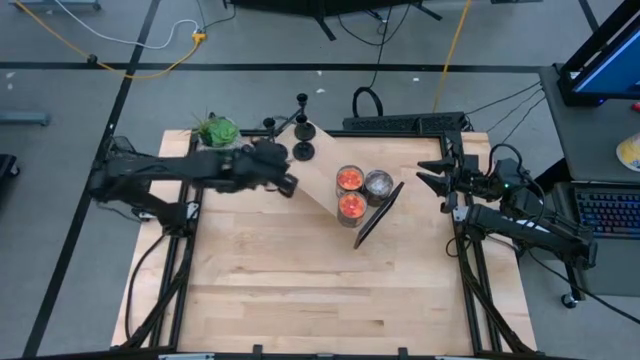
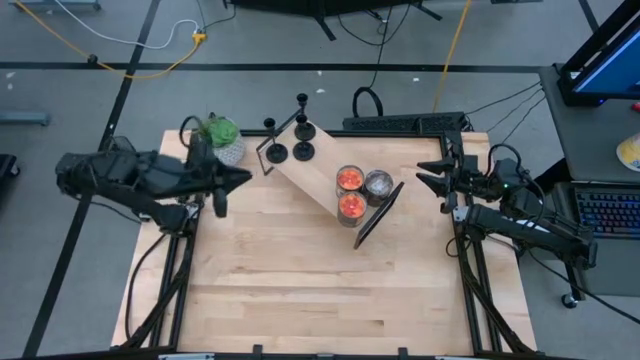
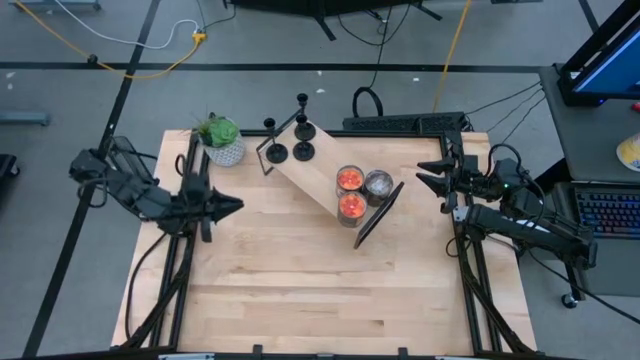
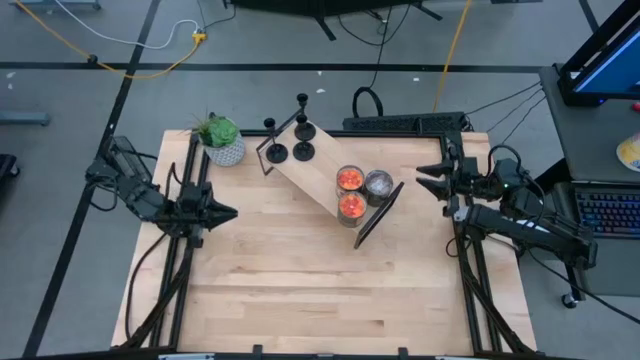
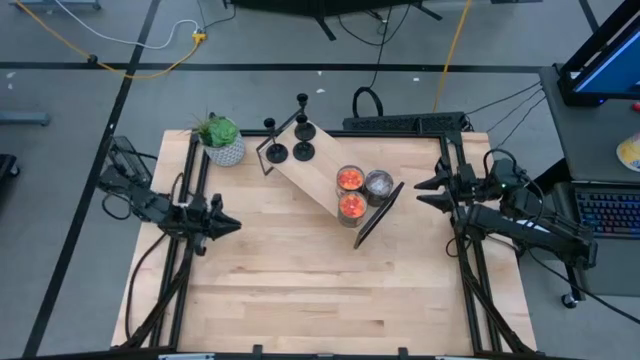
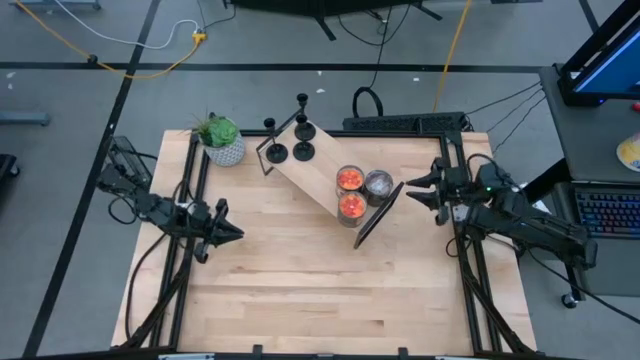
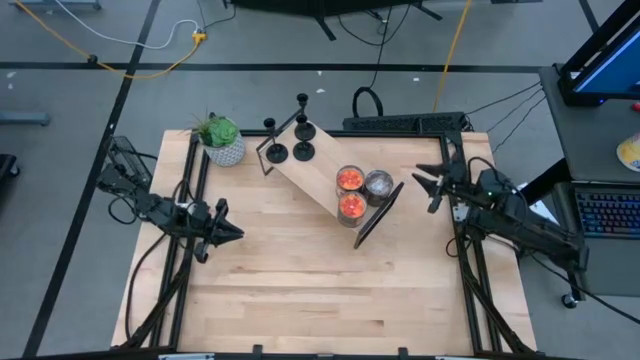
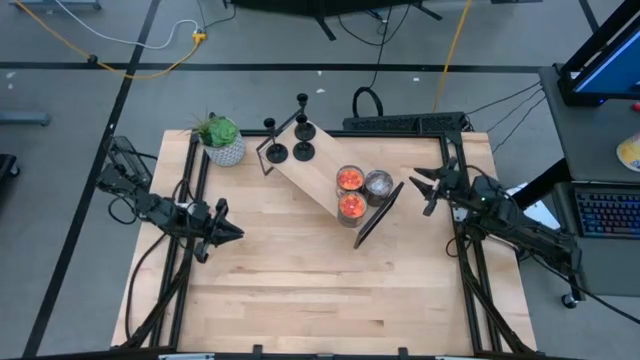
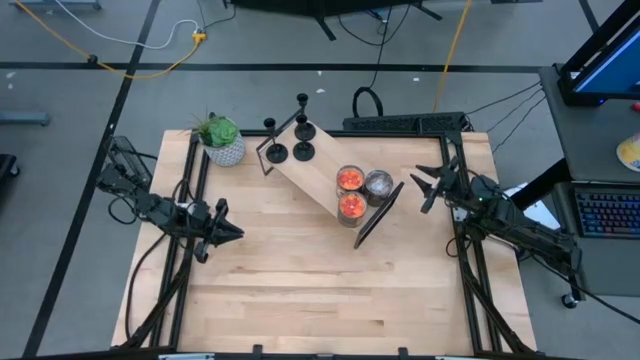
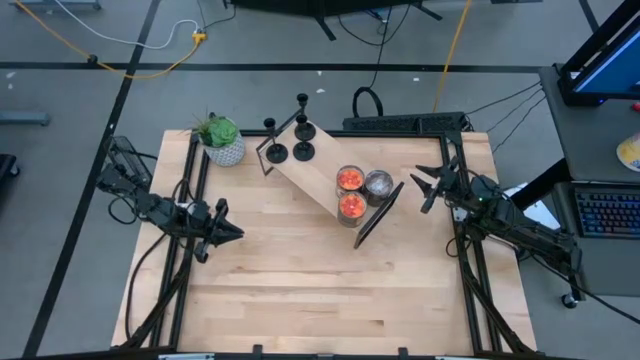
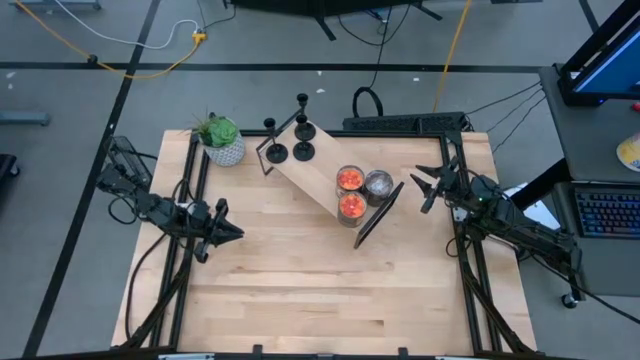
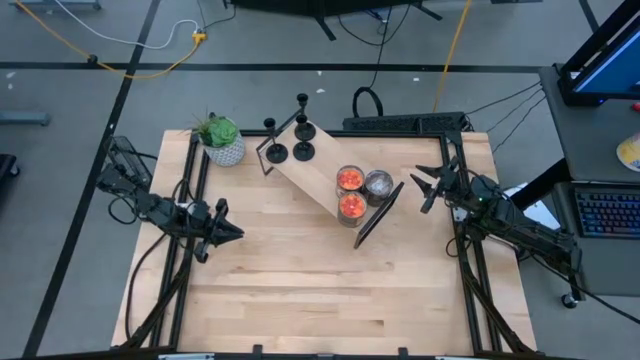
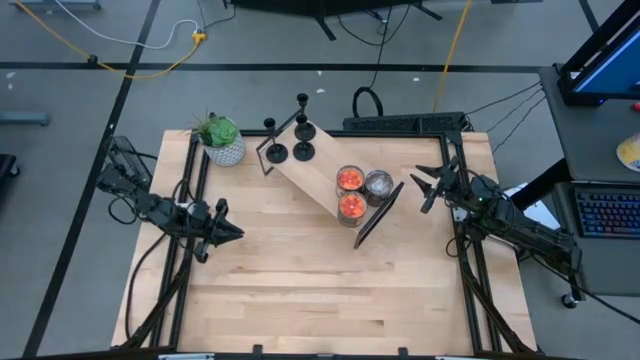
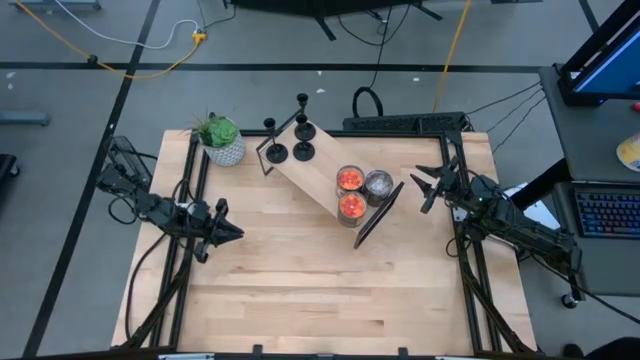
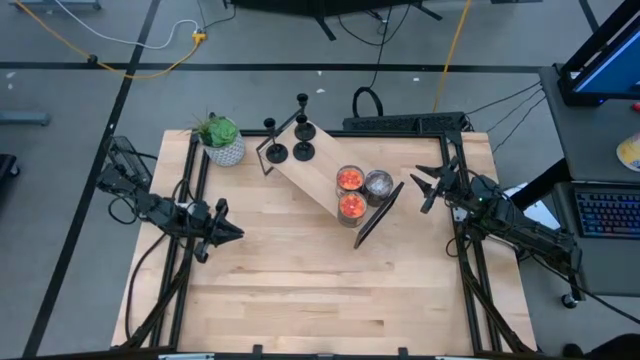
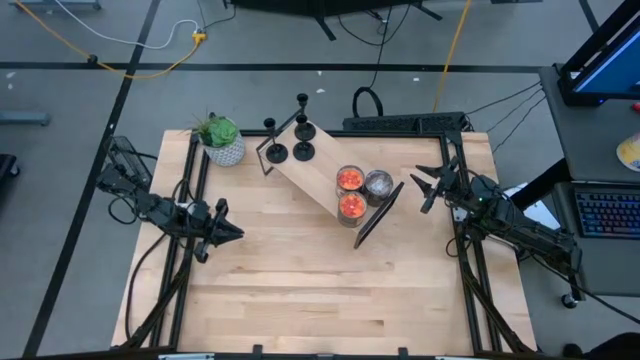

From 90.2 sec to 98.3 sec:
Task: Pick & Place candle stick holders
Return to Home Position

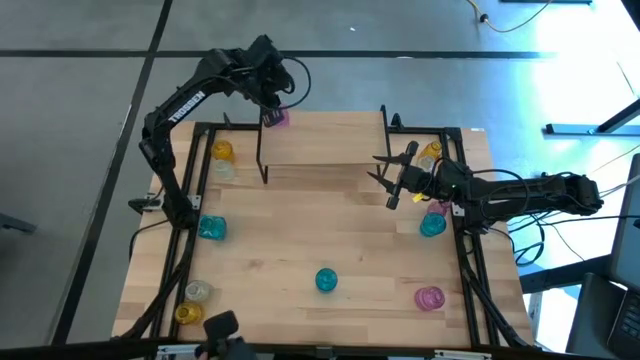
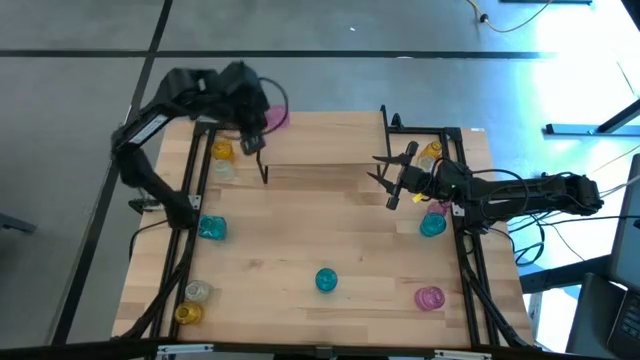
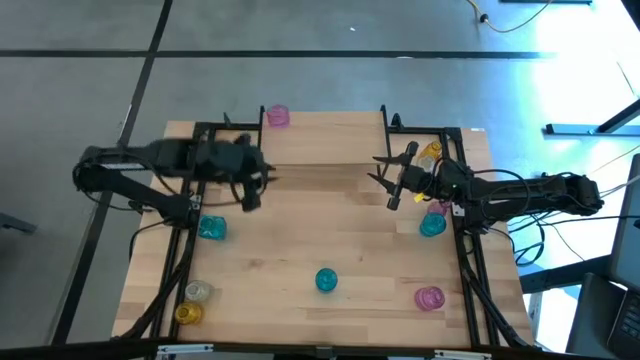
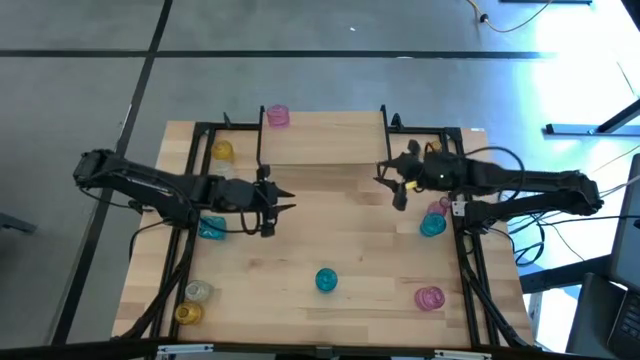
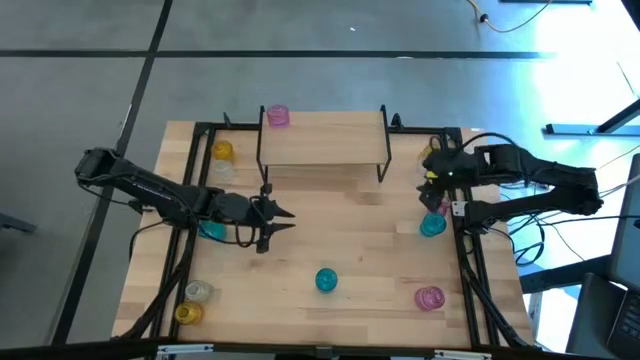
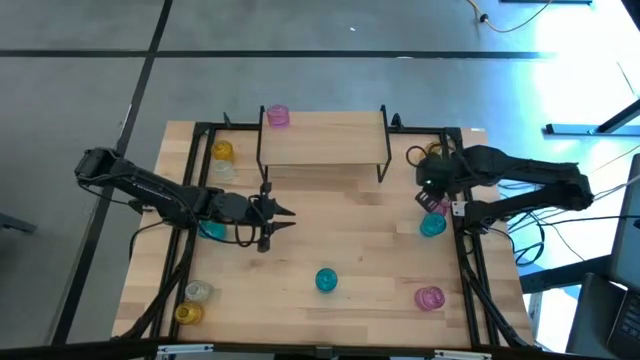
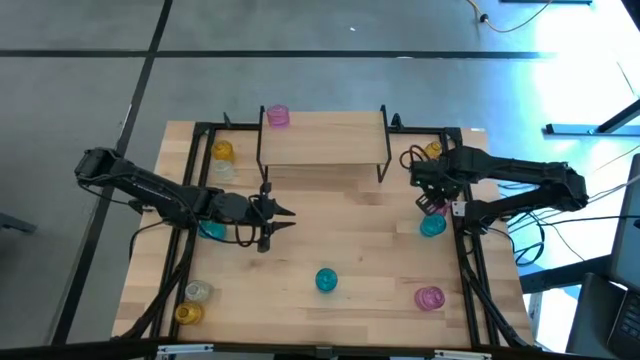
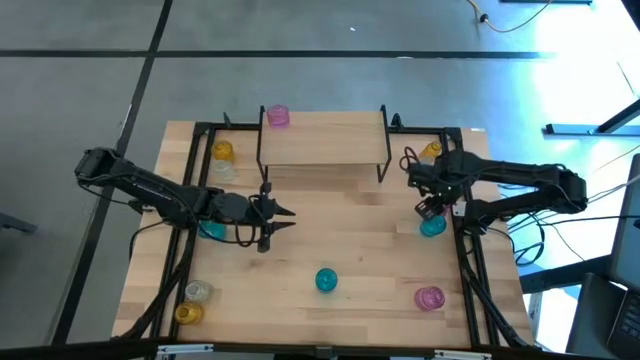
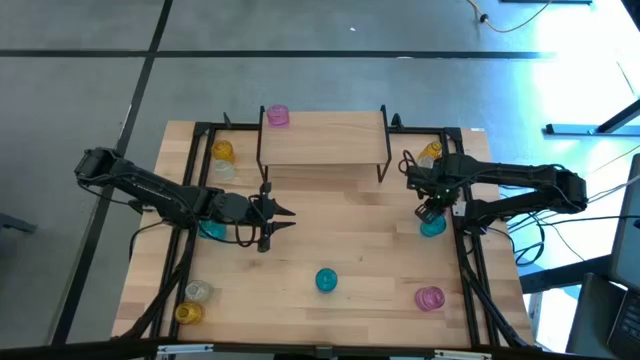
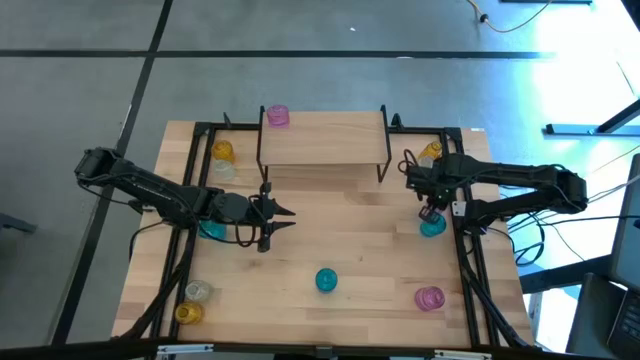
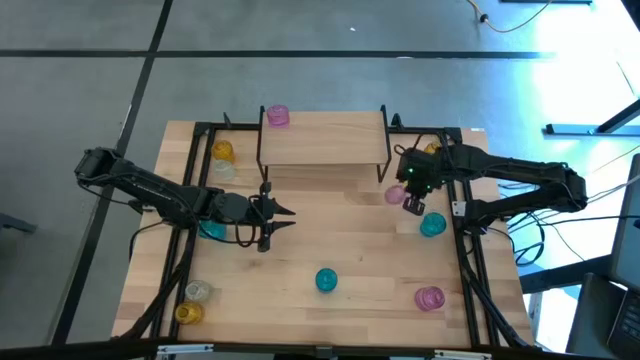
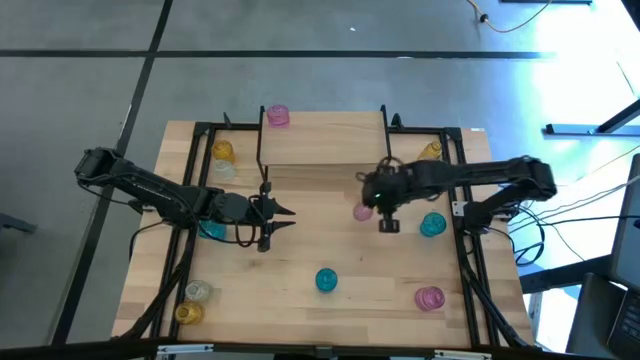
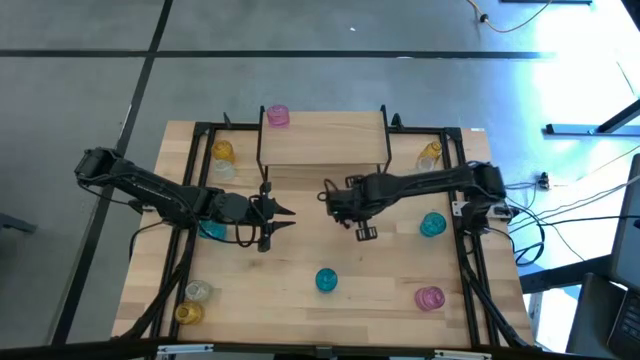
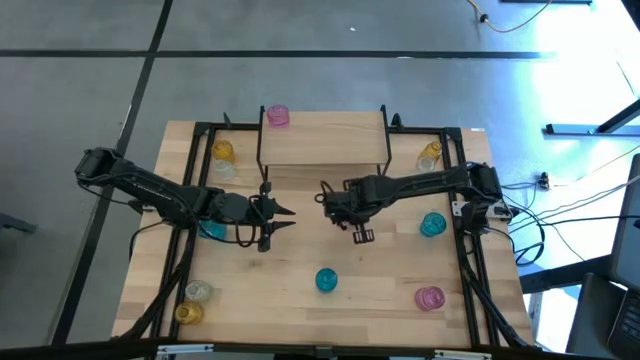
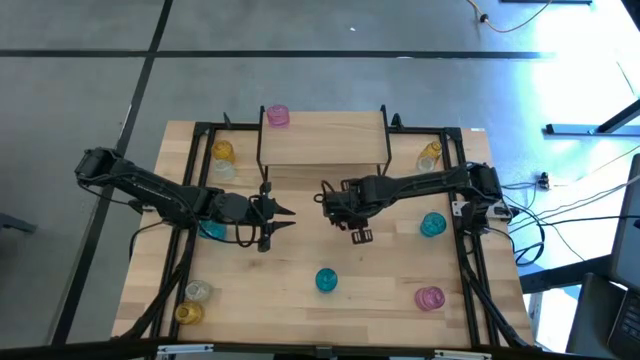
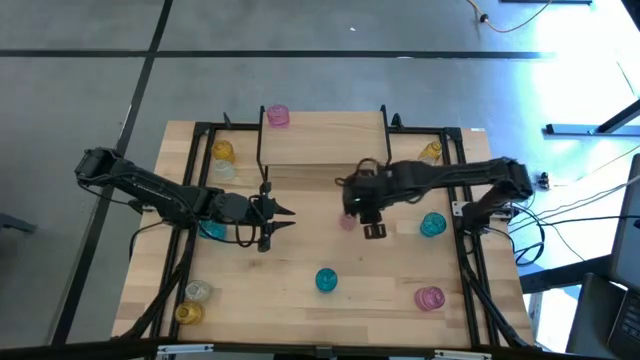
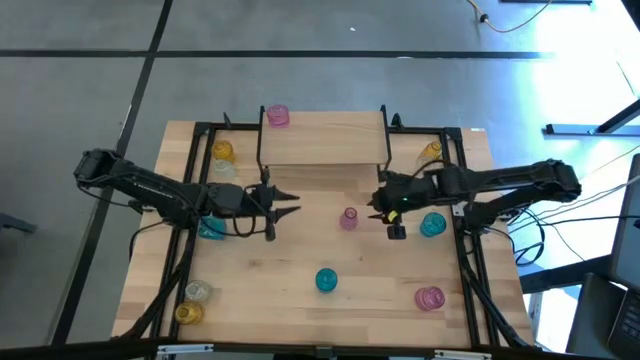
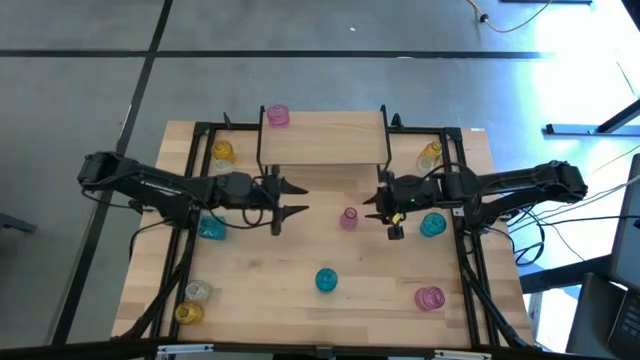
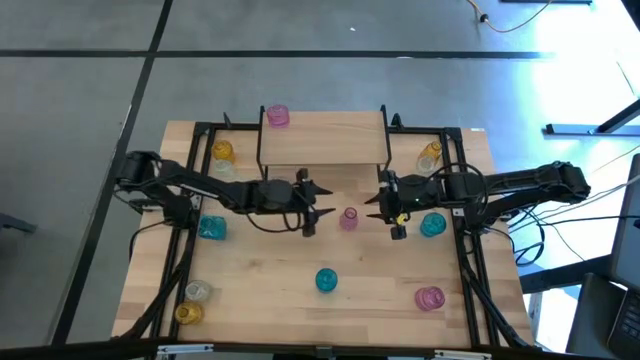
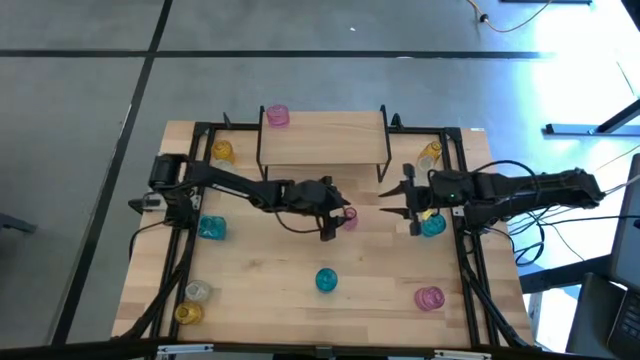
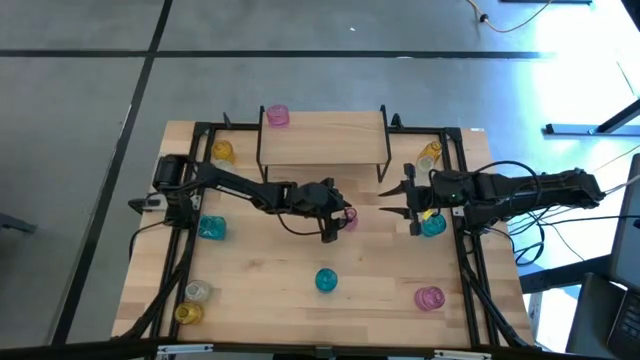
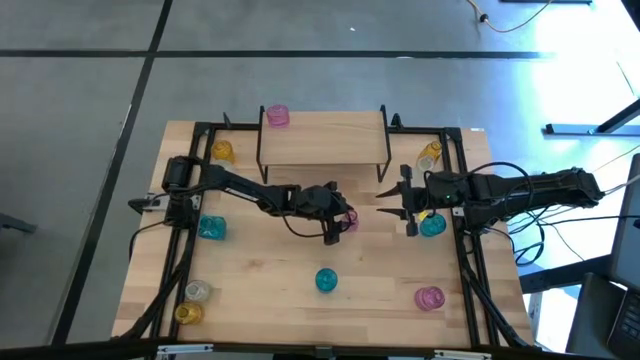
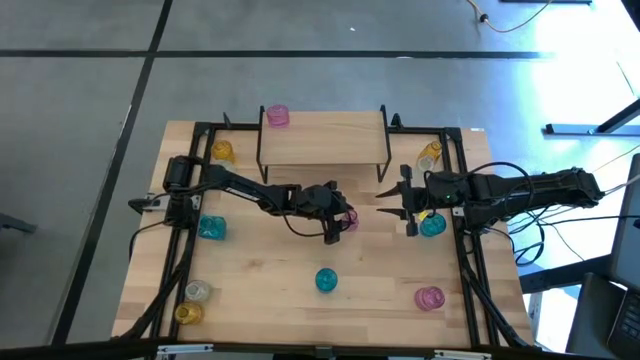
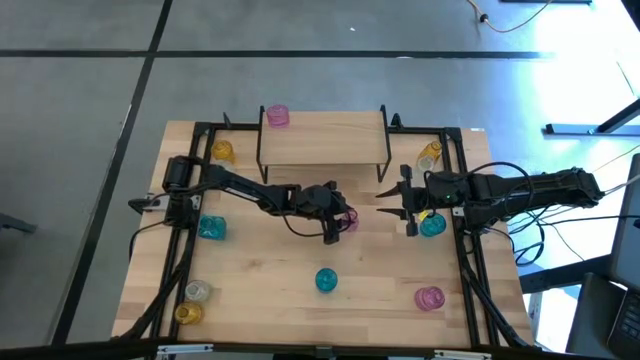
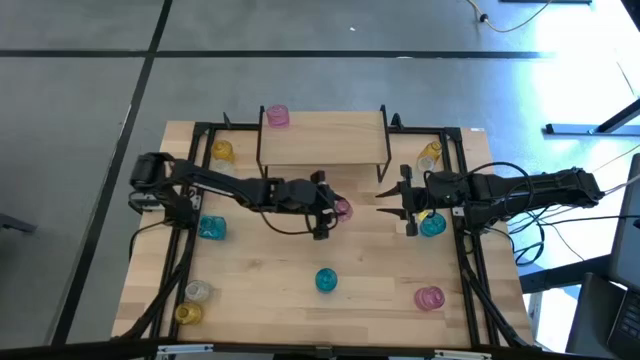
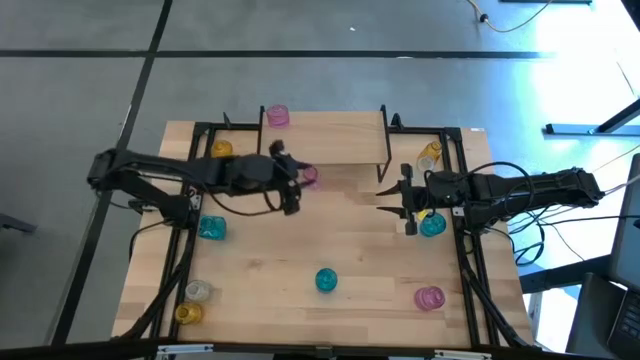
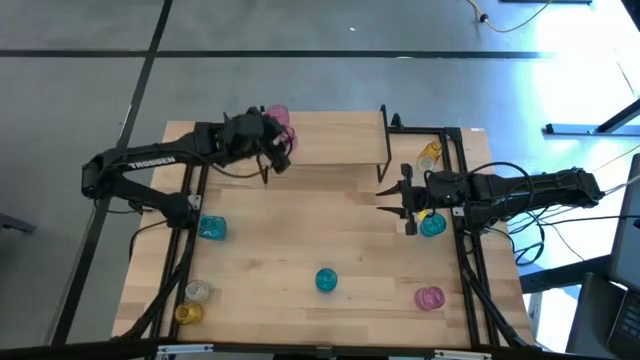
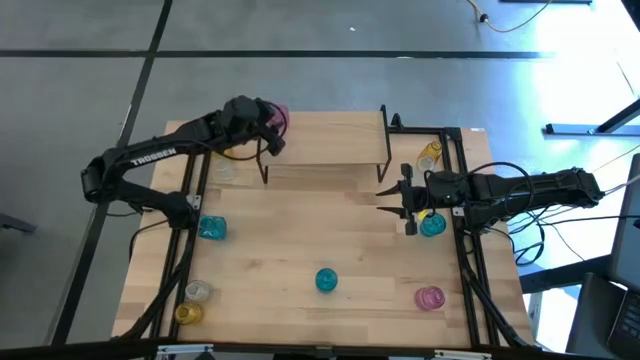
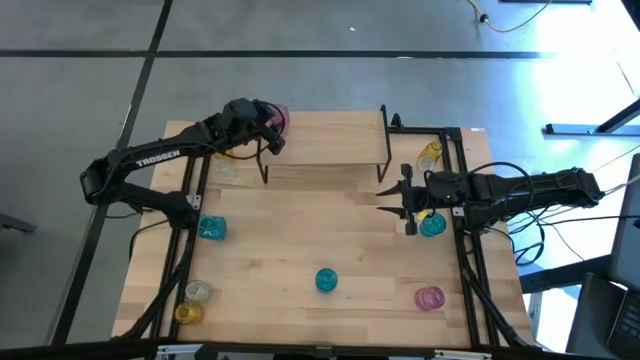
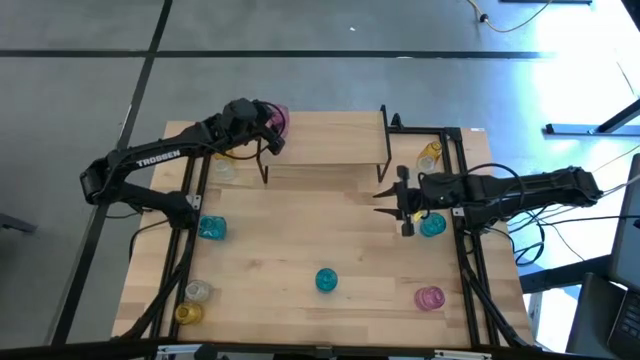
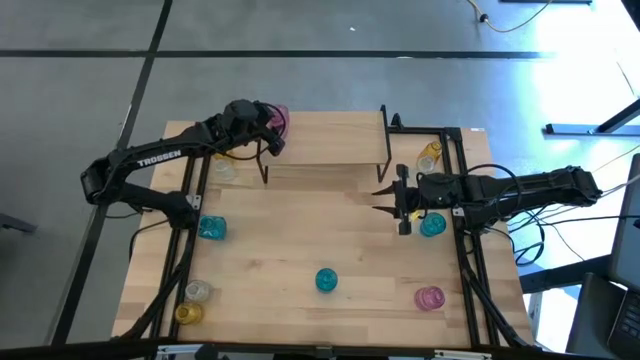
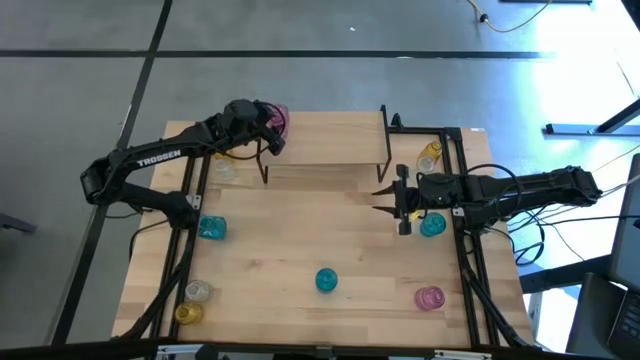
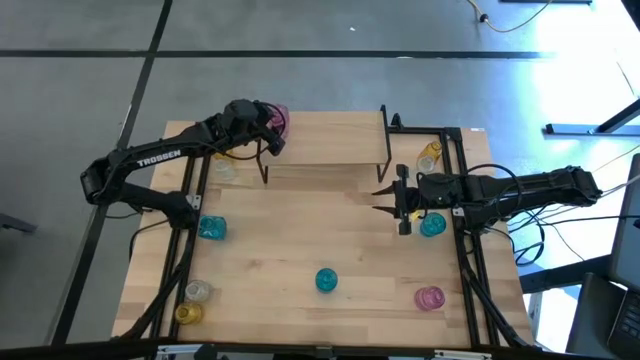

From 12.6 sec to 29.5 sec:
Task: sort vases onto shelf
Put the top violet flower vase on the shelf aligned with the other violet flower vase
